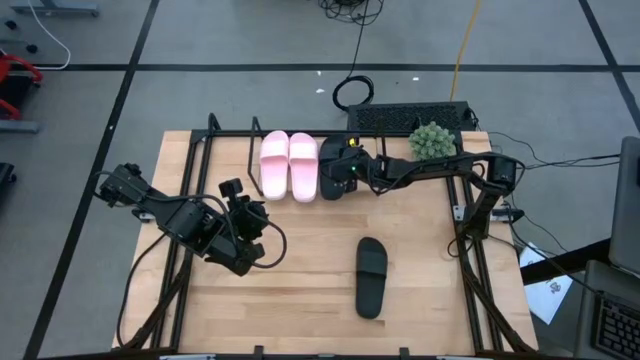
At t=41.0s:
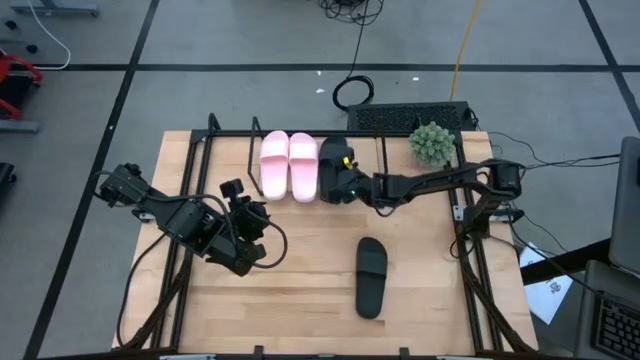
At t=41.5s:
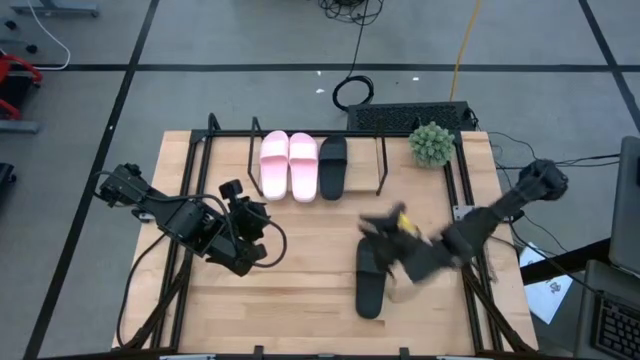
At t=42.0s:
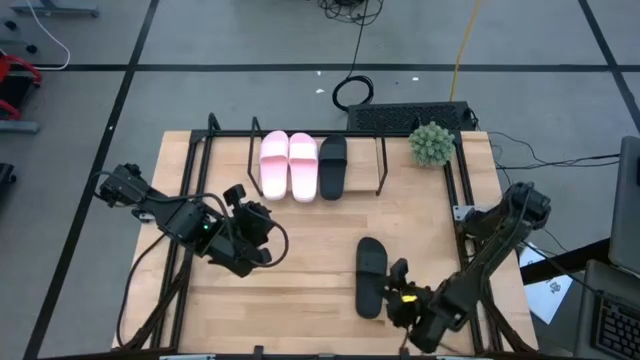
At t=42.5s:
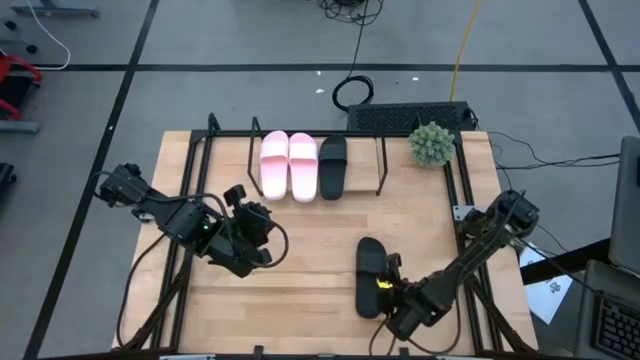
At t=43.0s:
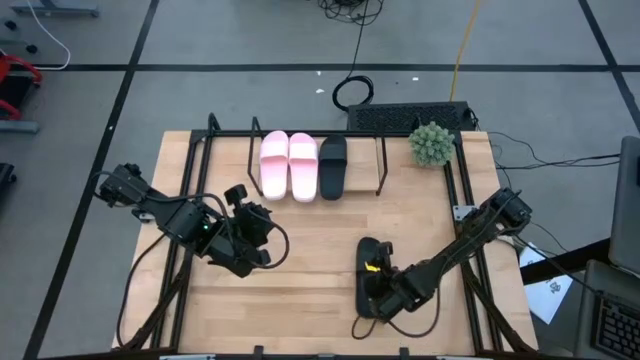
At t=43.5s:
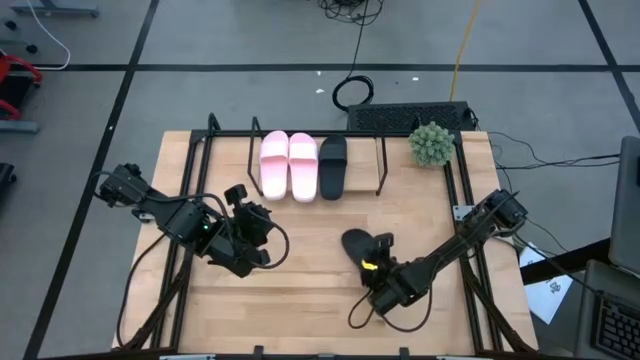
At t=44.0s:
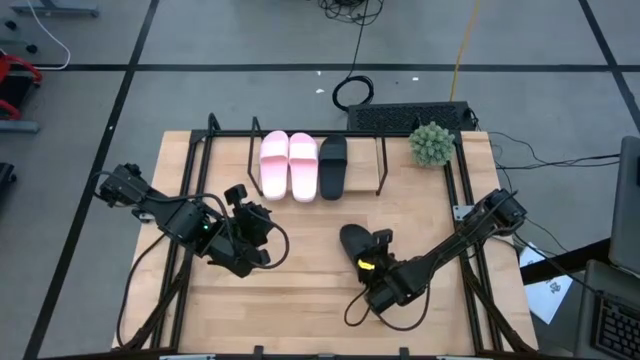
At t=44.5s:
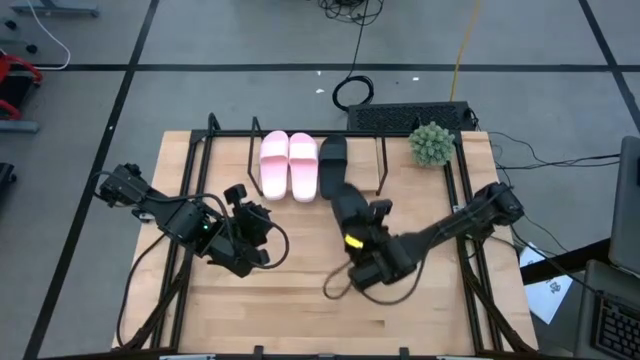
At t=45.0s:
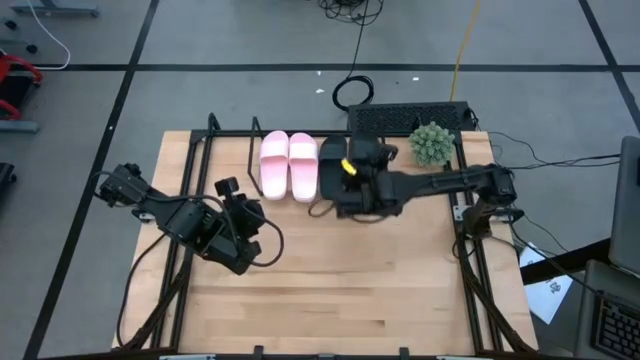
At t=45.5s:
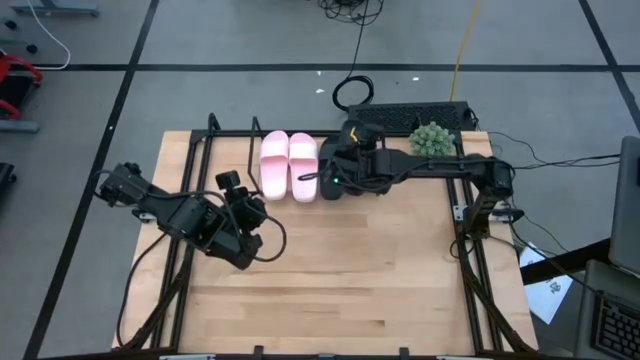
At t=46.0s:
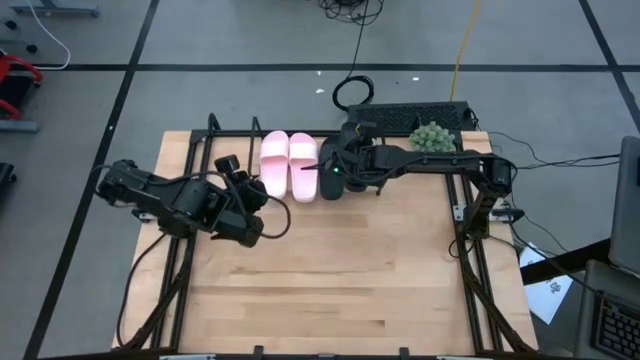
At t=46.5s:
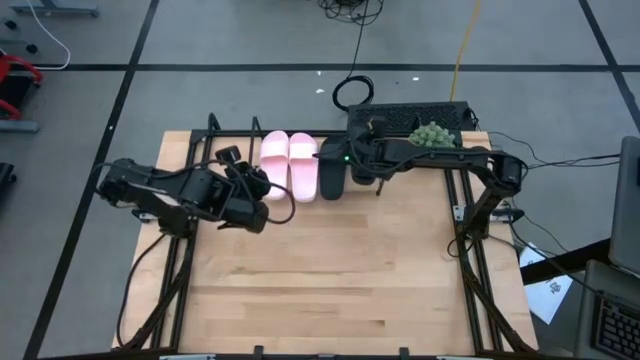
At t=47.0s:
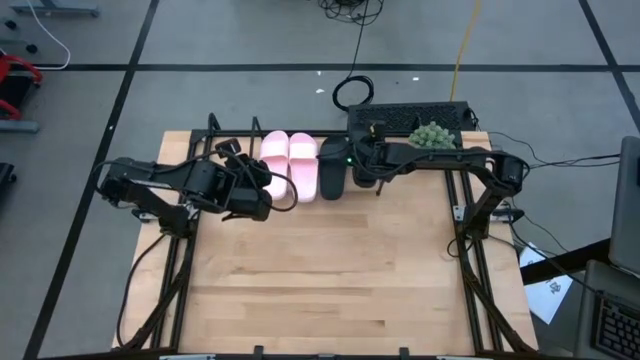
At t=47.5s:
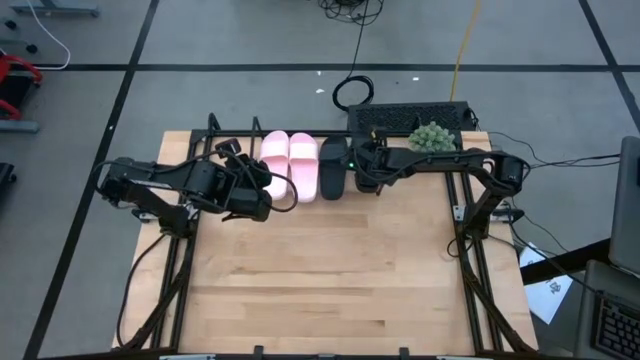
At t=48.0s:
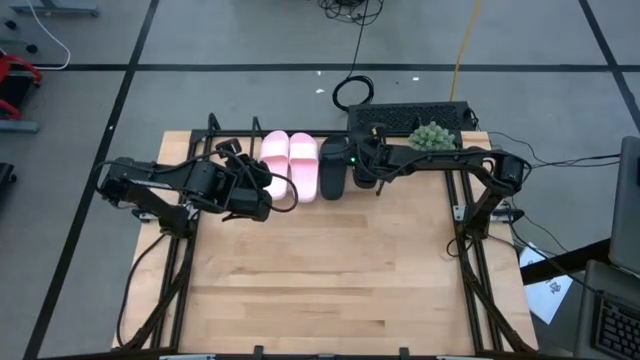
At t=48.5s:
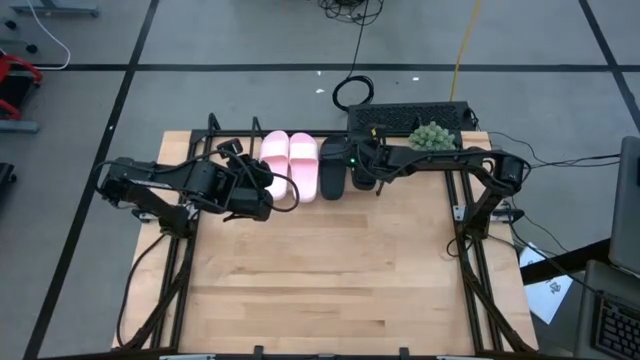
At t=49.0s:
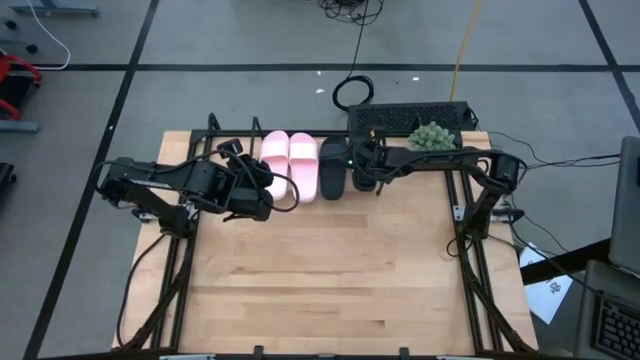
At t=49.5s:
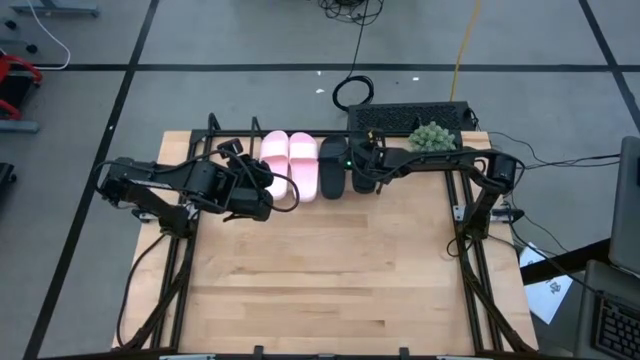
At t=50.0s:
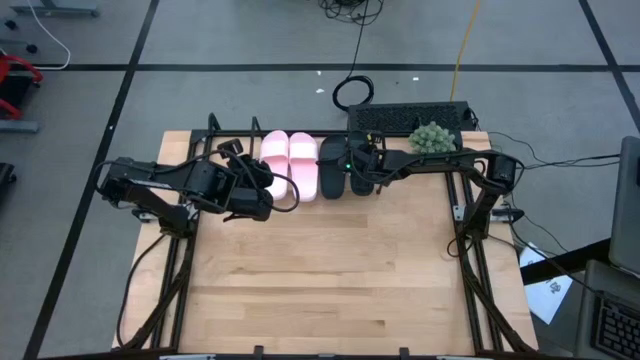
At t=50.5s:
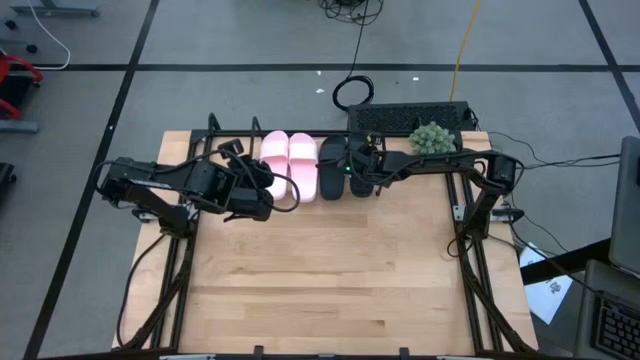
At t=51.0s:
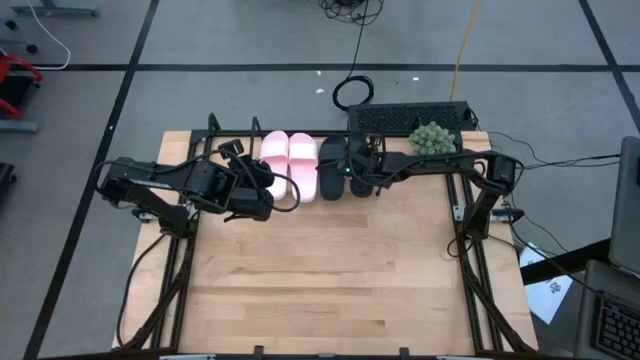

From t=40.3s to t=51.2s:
Task: Pick and place slides into the shelf
Put the black slipper on the shelf

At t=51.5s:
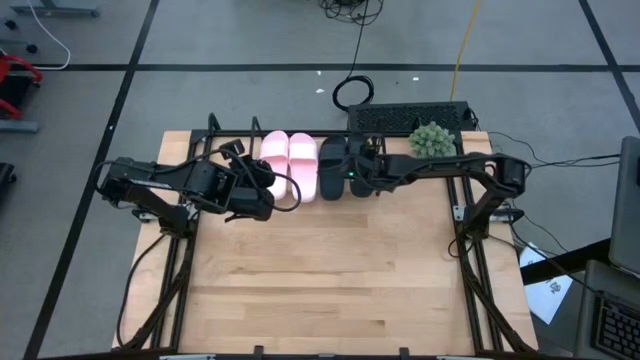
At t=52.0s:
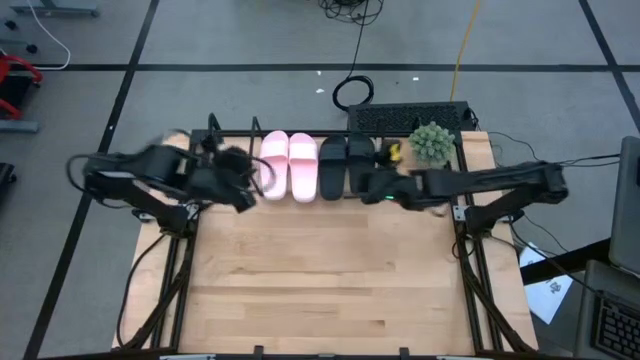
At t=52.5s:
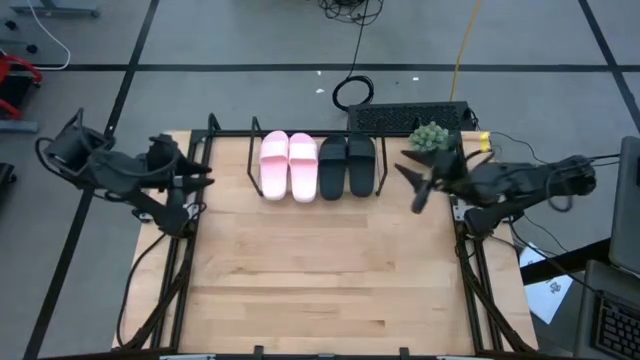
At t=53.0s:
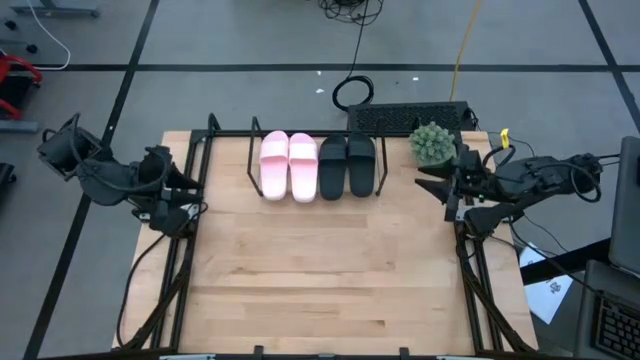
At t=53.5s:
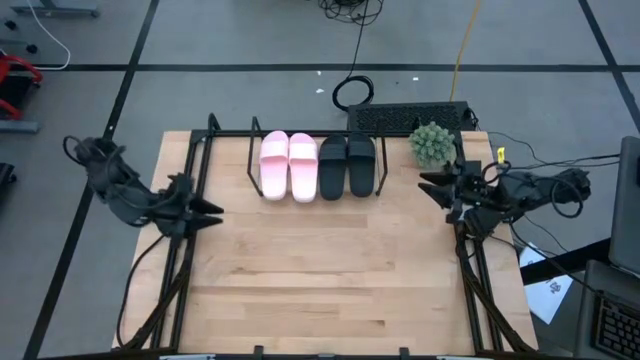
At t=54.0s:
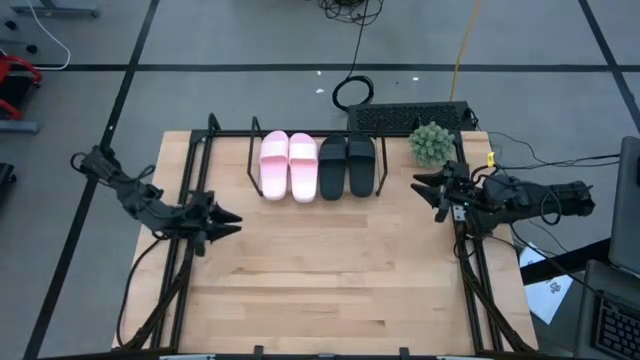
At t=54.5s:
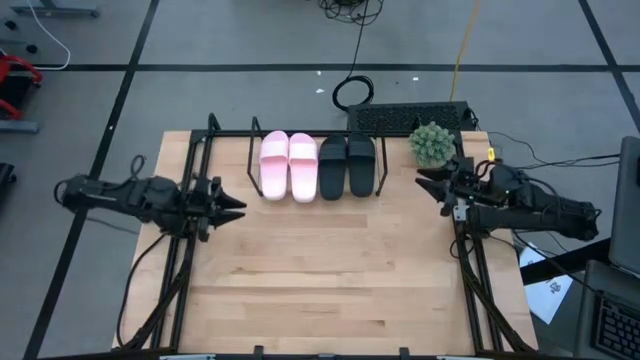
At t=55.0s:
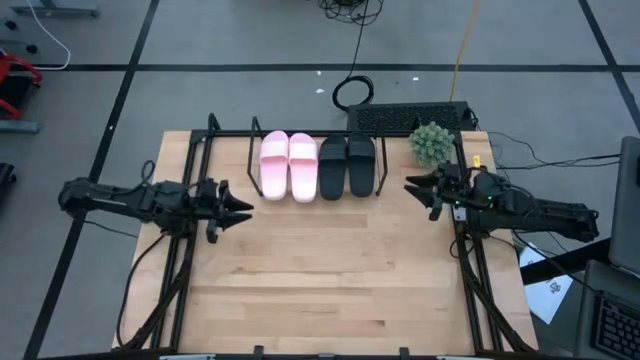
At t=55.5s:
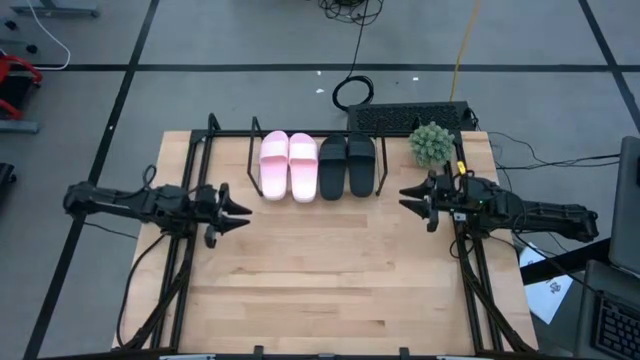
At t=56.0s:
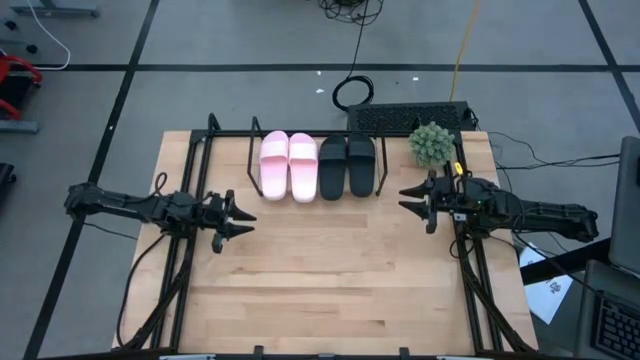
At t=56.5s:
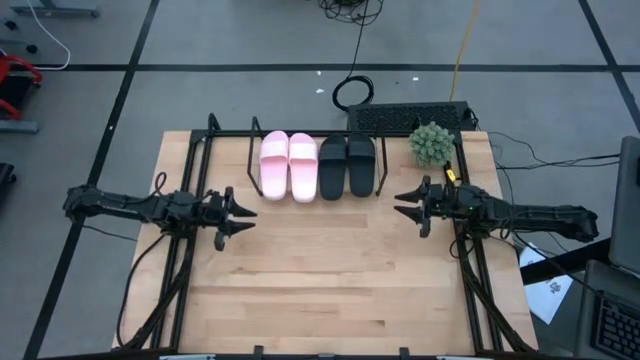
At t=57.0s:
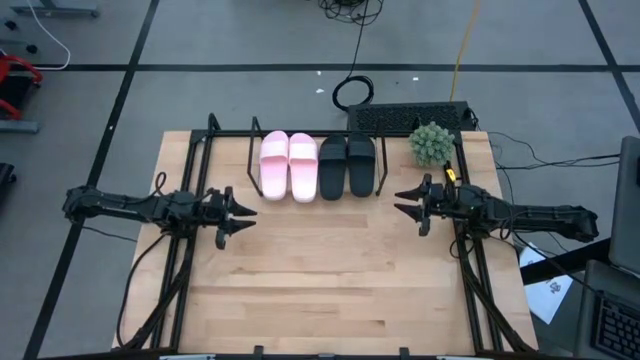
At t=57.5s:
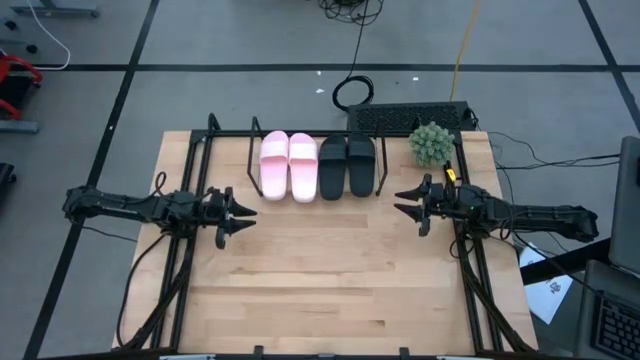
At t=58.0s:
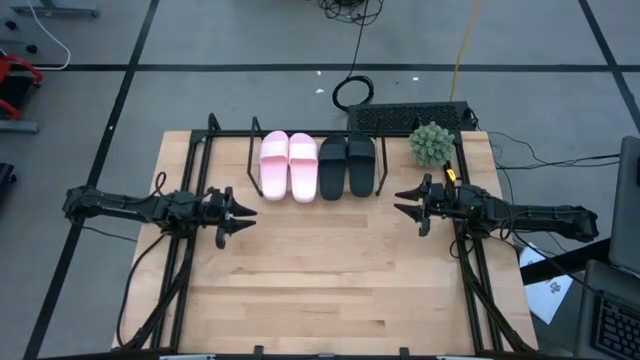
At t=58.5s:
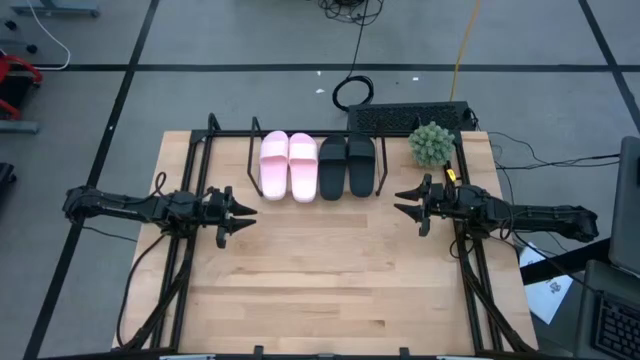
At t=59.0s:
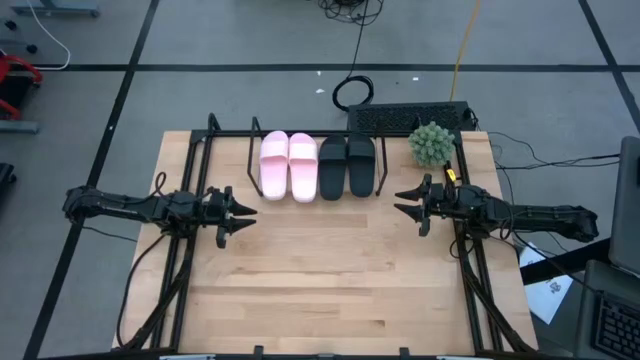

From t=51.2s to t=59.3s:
Return to Home Position

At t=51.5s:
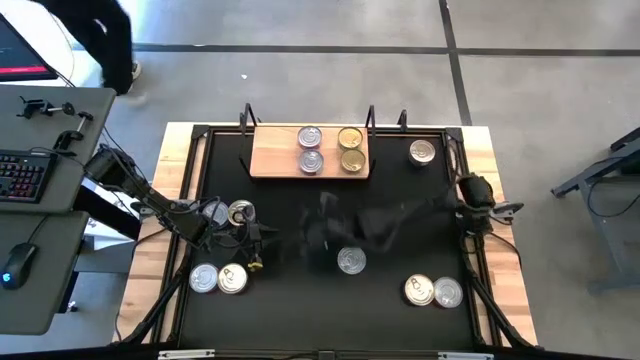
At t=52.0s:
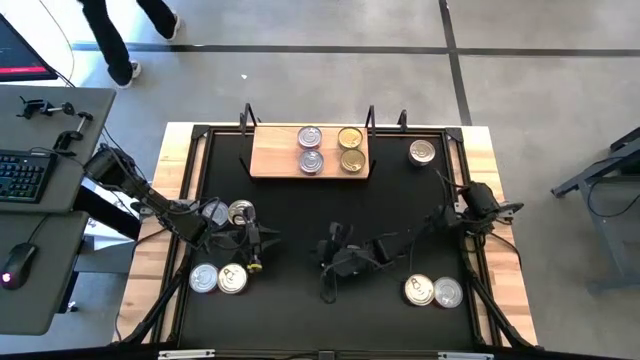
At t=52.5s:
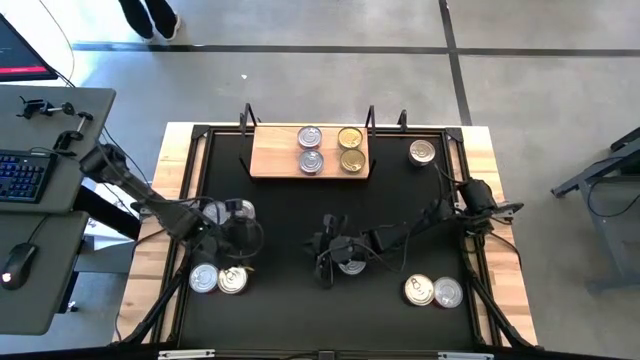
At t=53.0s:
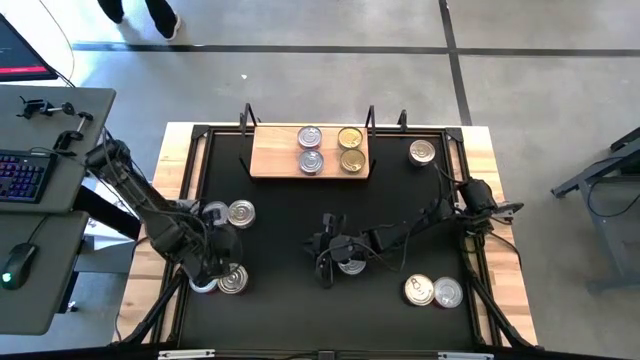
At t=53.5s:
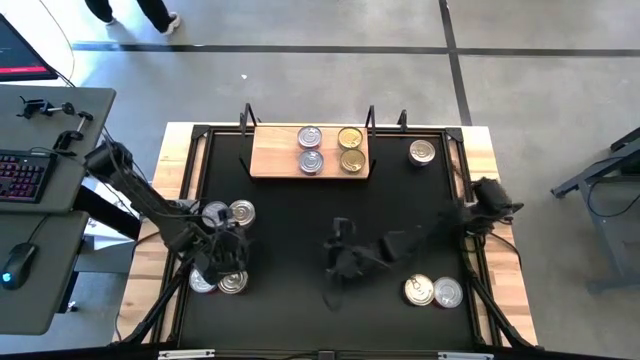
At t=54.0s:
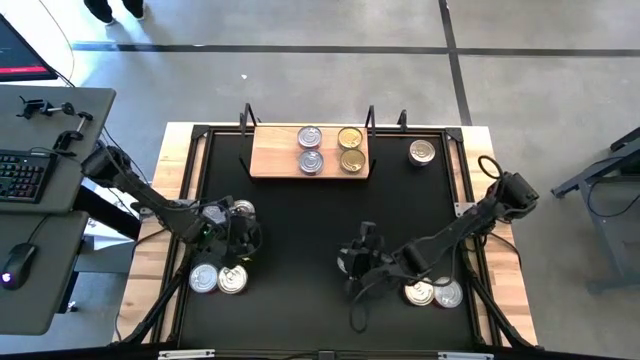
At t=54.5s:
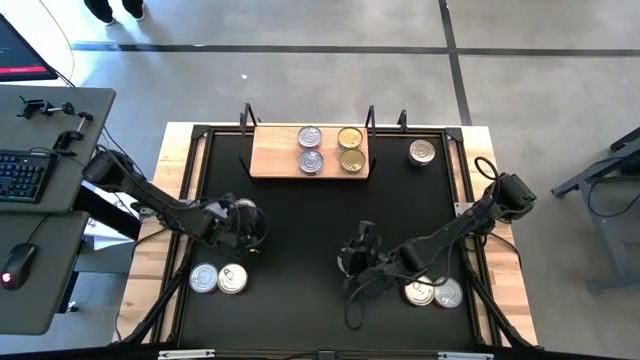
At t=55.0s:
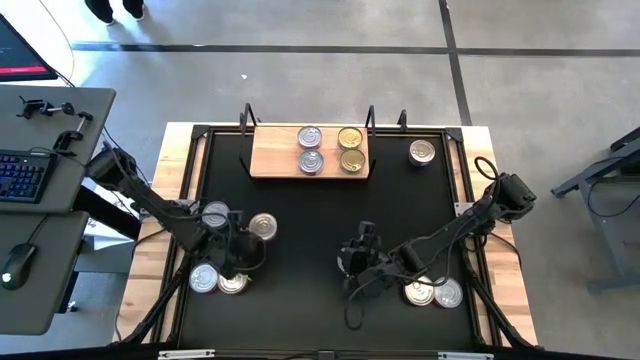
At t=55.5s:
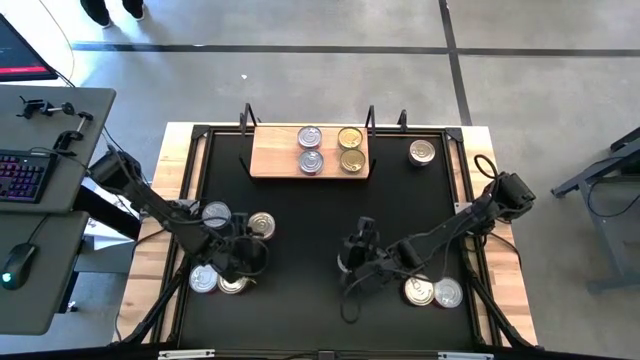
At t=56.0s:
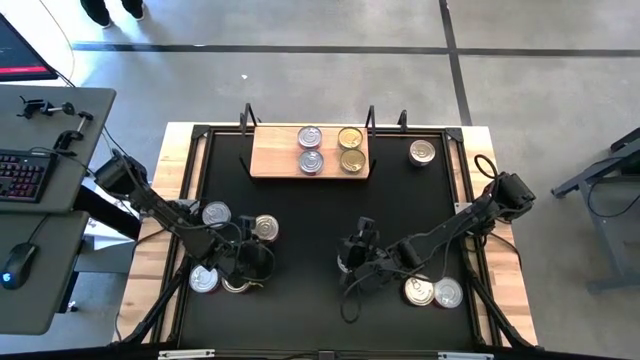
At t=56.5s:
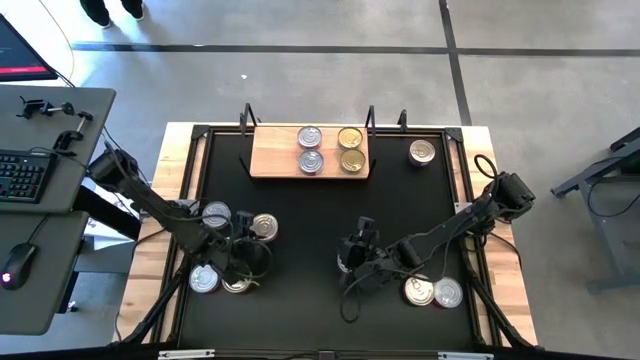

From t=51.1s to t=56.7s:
Task: Stack canned seafood by type on shelf
Put the blue tuna can on the shelf
